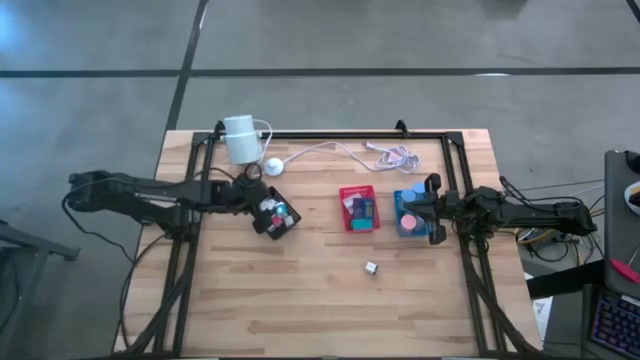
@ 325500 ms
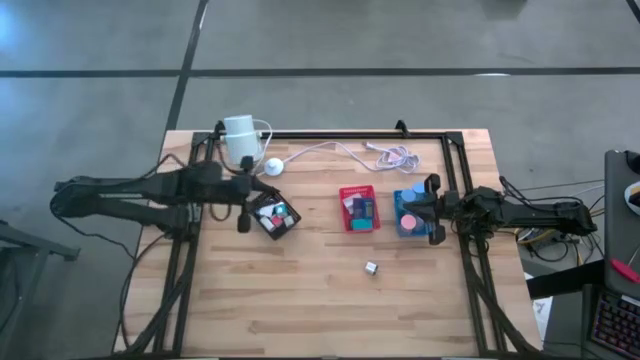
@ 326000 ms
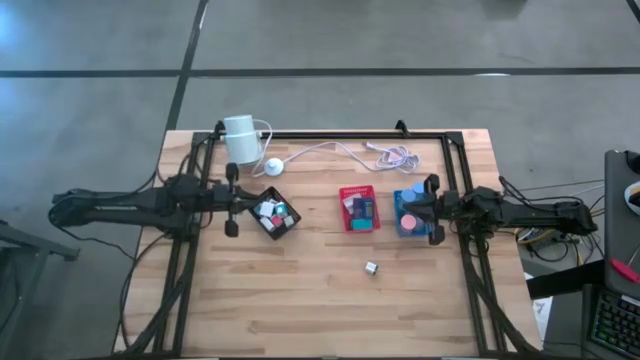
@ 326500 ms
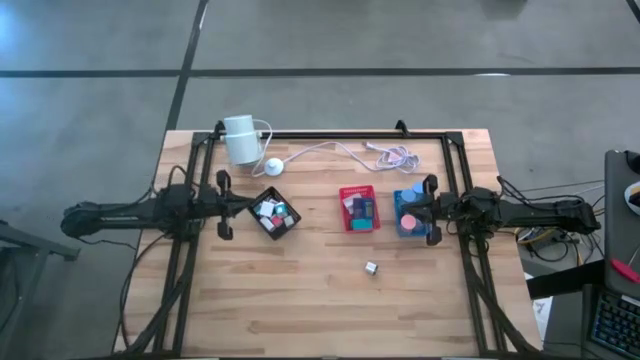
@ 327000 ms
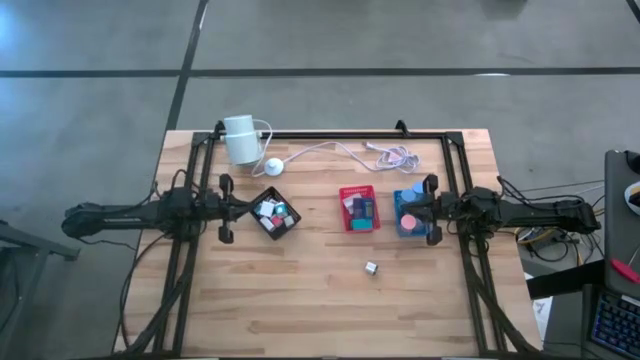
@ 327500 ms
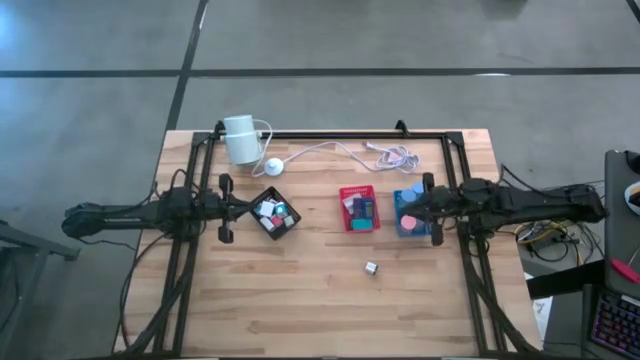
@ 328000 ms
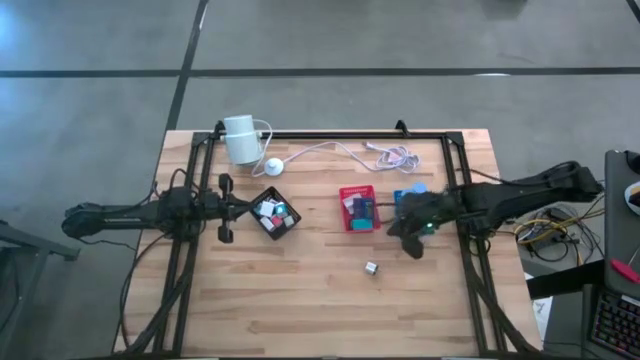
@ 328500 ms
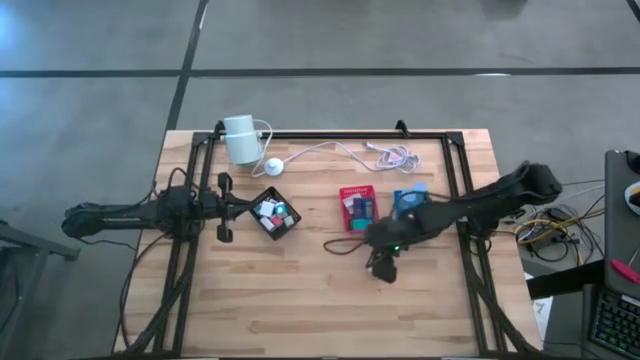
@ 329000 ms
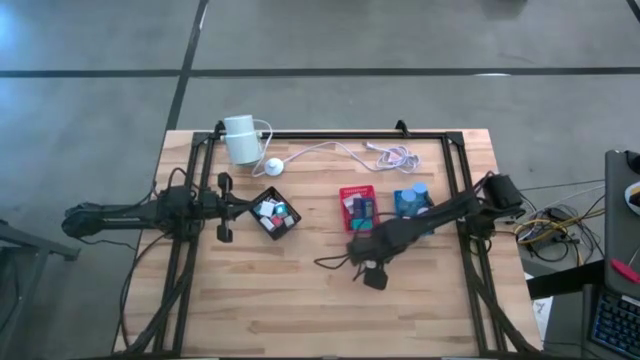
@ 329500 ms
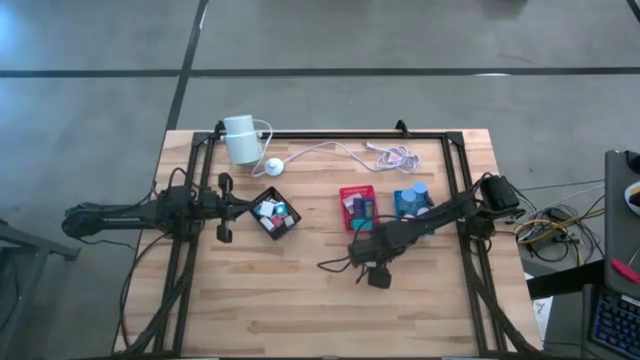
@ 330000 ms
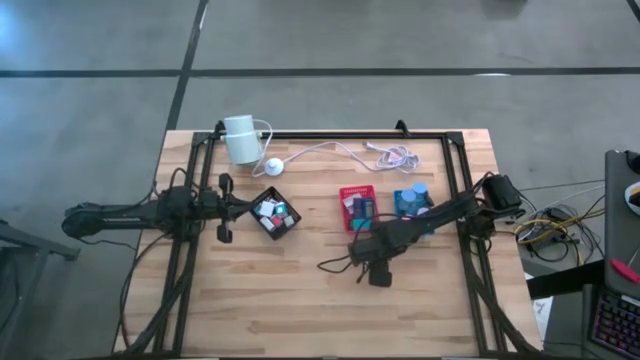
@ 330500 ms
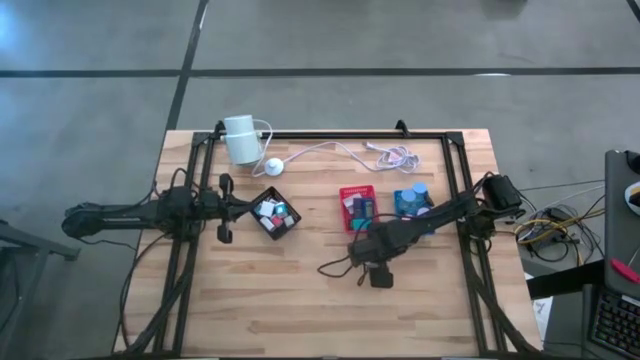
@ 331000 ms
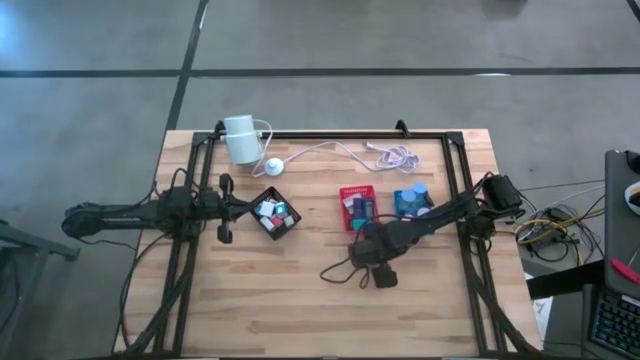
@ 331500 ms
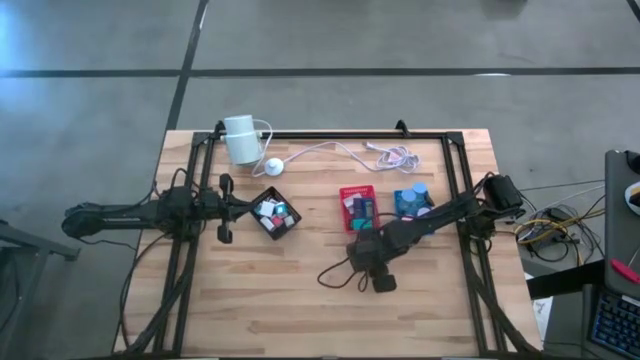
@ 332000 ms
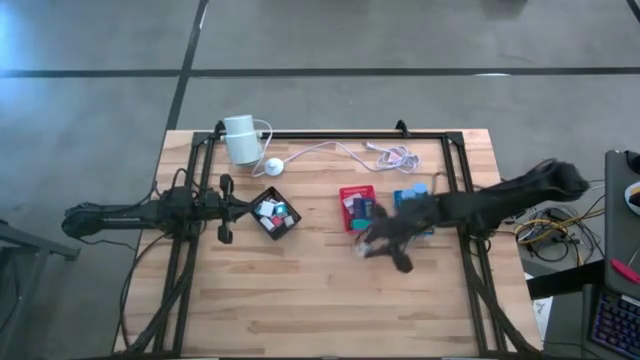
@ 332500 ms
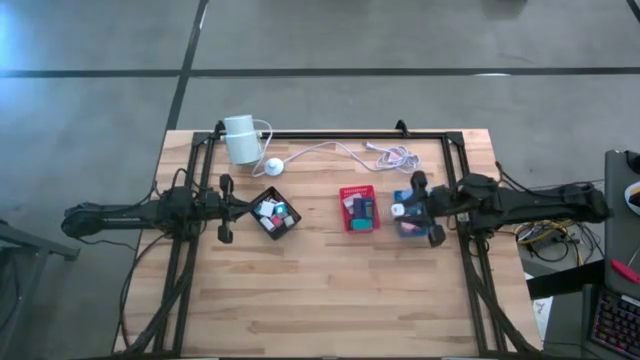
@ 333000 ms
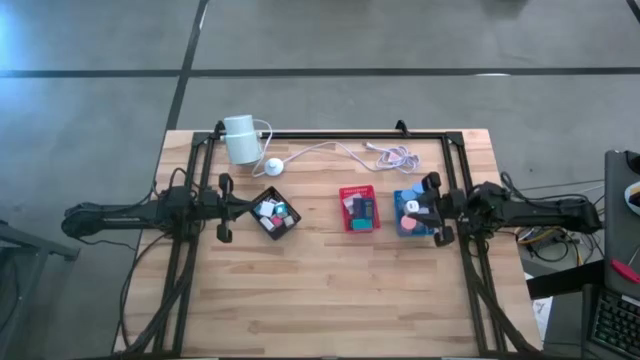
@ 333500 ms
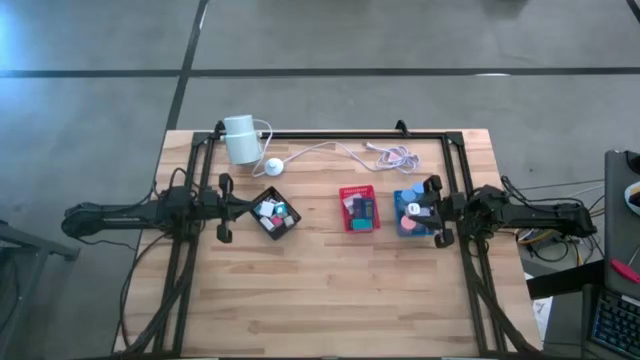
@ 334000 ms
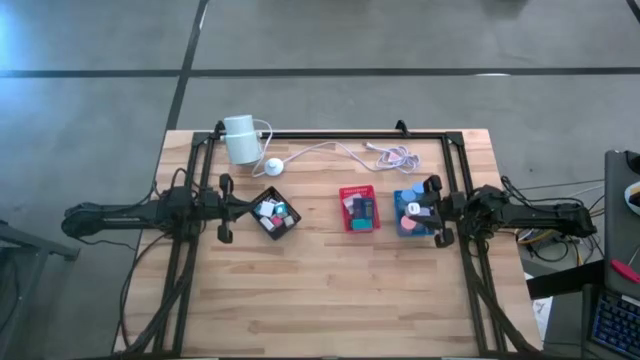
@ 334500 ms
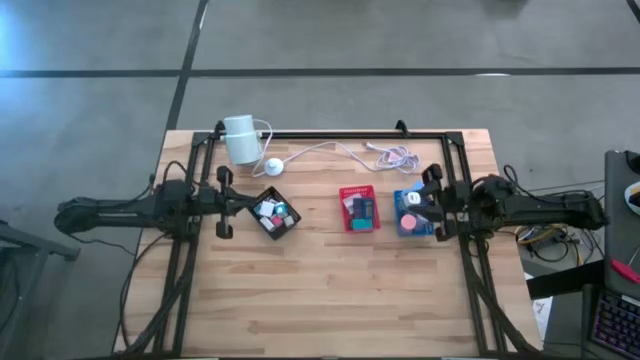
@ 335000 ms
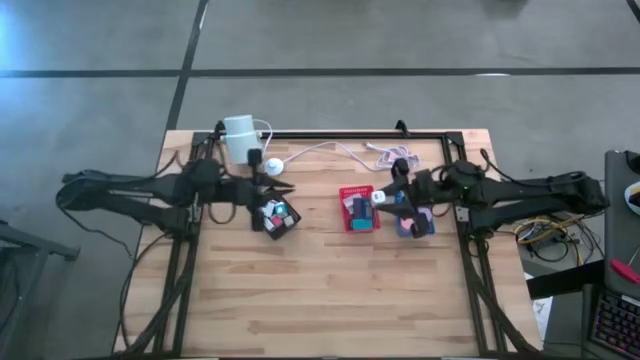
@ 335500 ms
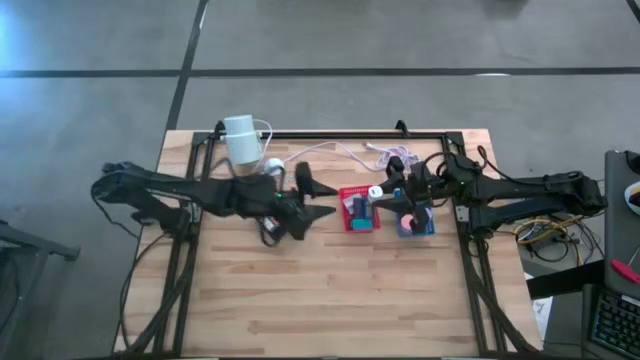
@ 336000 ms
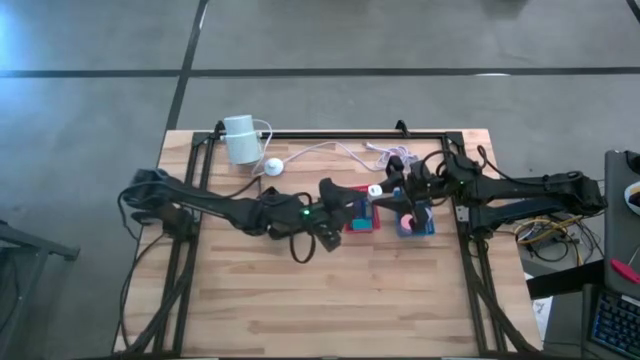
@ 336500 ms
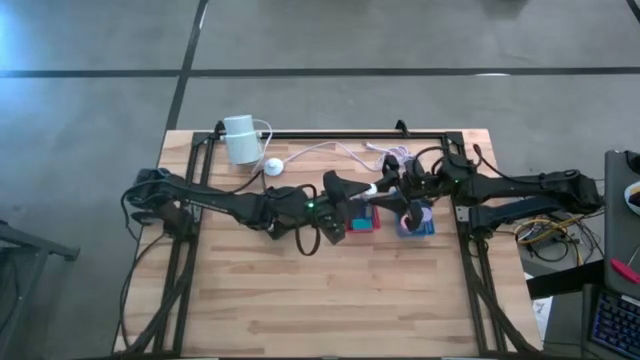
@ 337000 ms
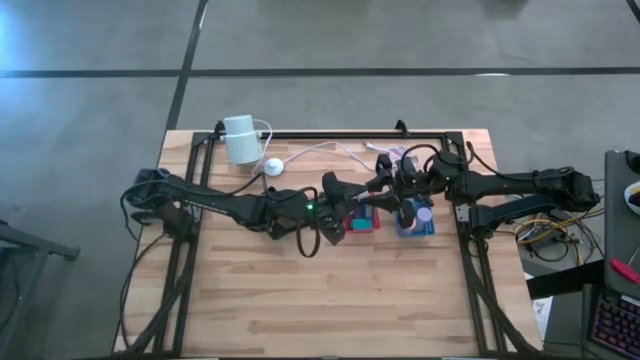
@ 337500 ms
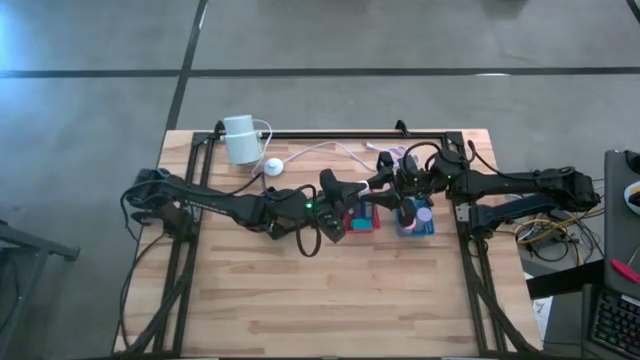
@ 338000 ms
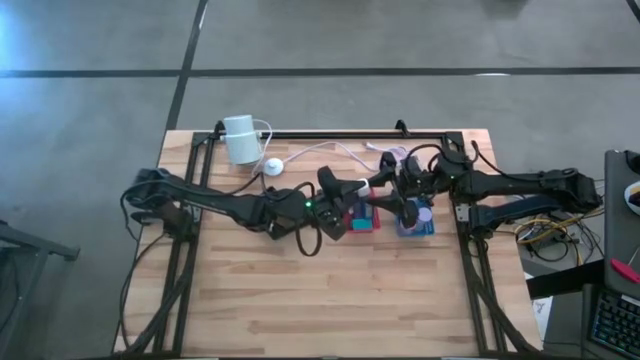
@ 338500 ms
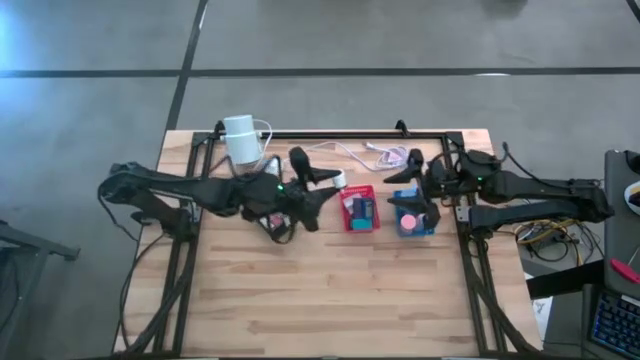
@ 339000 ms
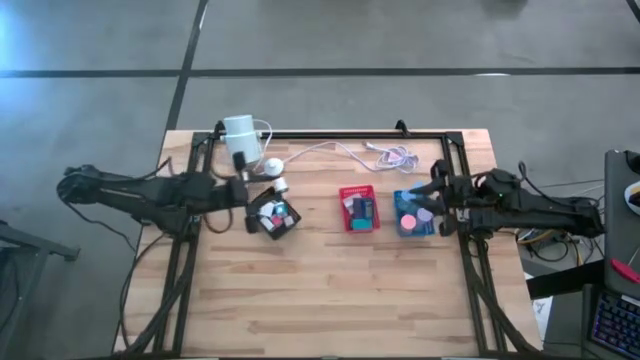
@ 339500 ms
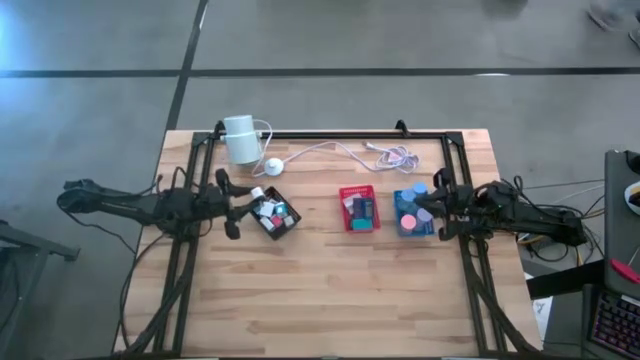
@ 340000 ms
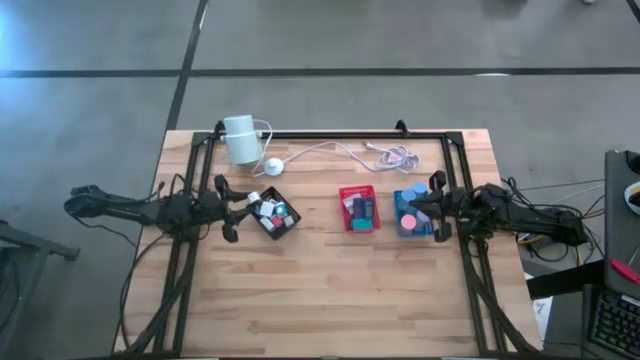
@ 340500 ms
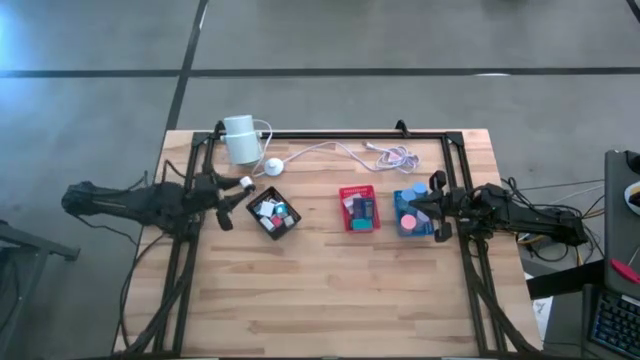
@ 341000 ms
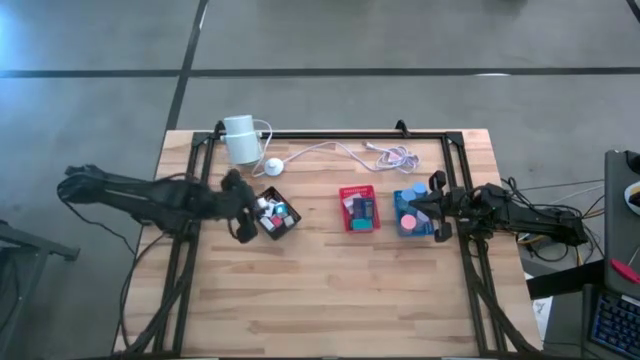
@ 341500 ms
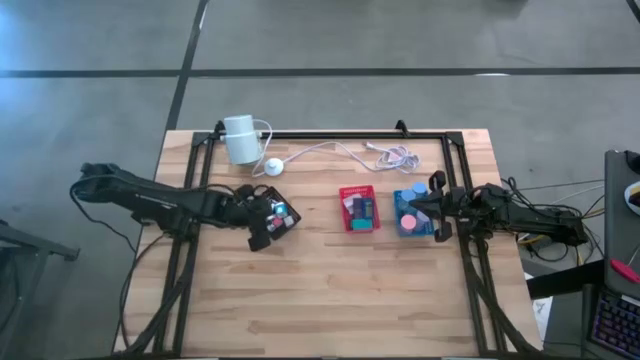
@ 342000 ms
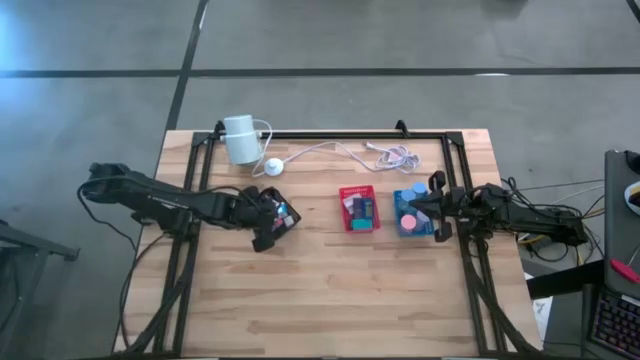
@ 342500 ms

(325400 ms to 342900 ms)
Task: Pick & Place Office items
Put the black and white charger adaptor into the black bin

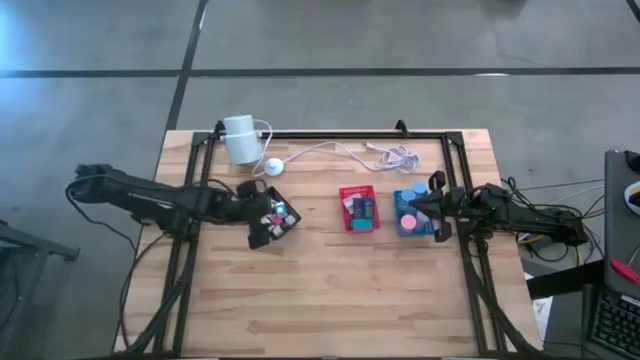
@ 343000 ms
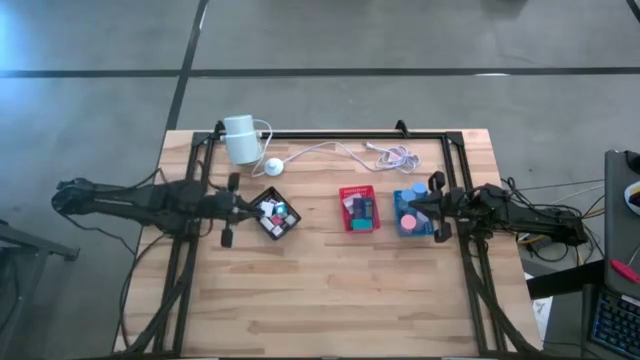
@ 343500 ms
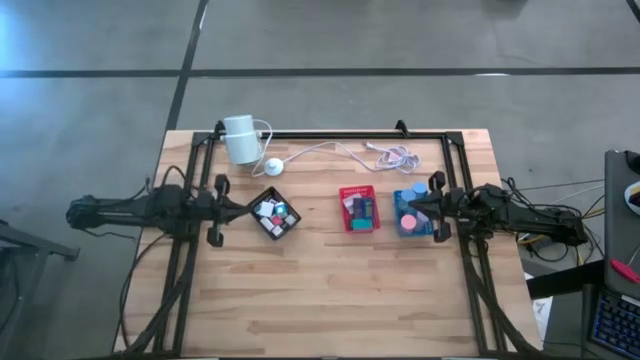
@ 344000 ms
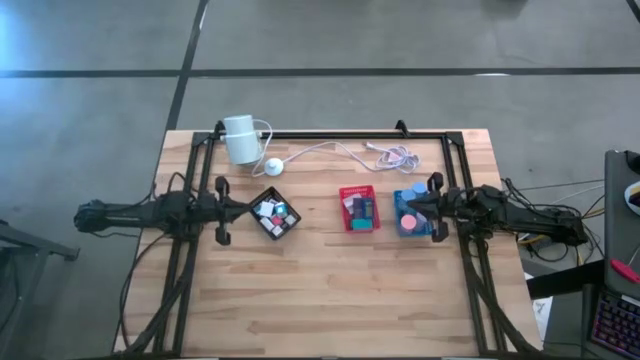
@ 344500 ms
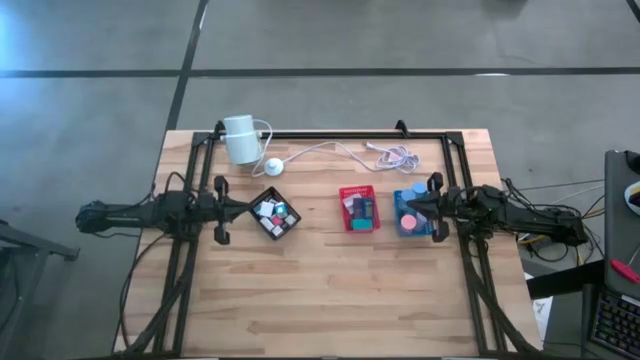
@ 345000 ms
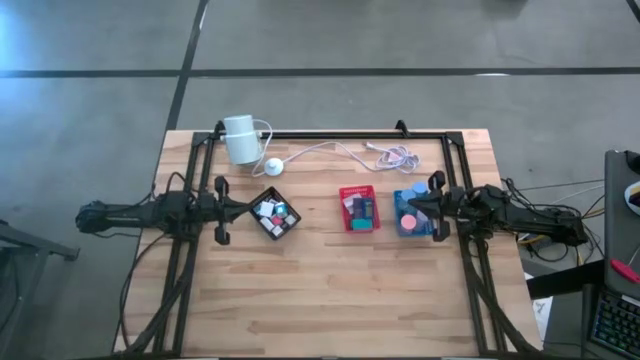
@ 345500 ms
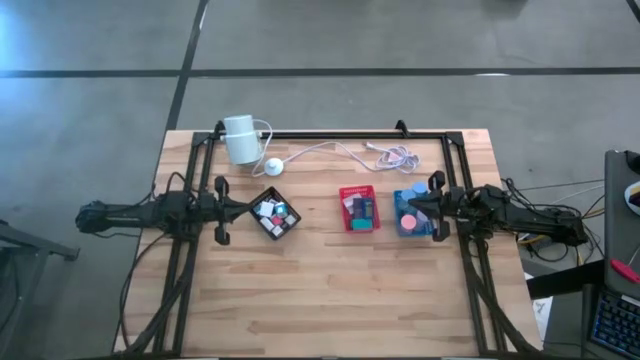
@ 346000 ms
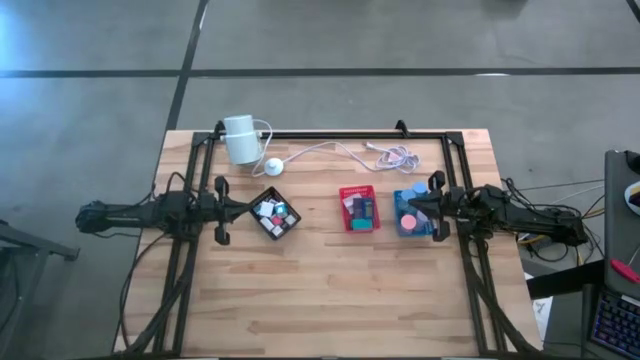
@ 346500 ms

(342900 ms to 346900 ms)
Return to Home Position
